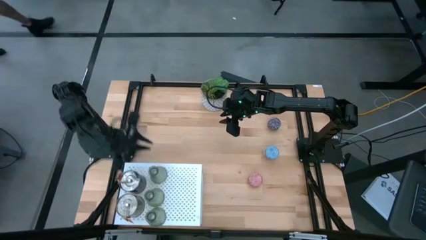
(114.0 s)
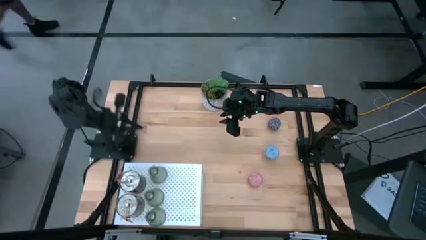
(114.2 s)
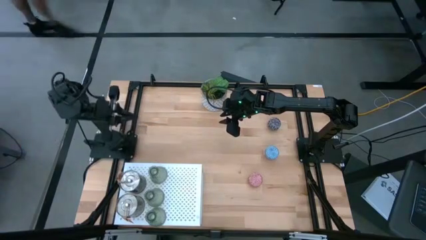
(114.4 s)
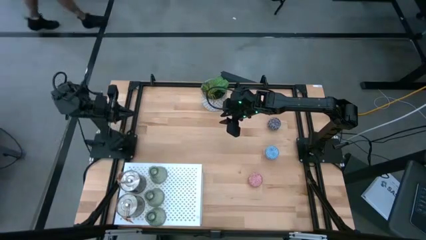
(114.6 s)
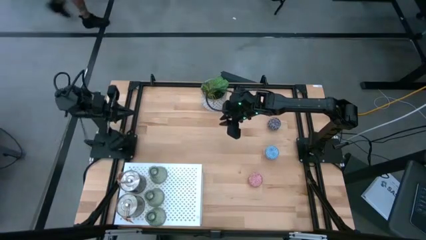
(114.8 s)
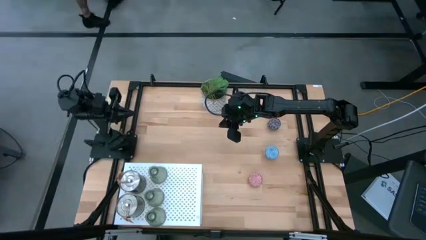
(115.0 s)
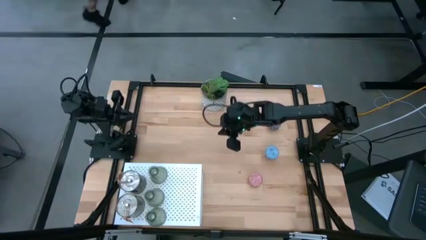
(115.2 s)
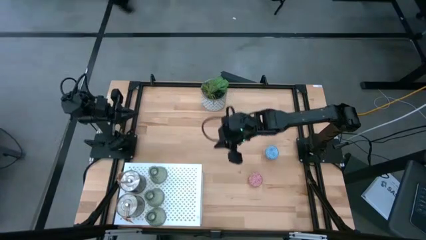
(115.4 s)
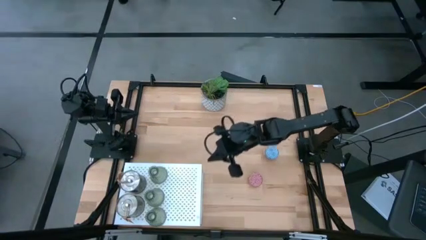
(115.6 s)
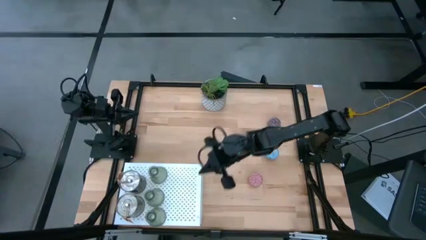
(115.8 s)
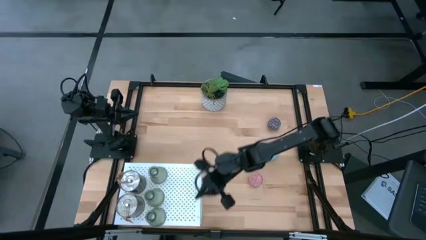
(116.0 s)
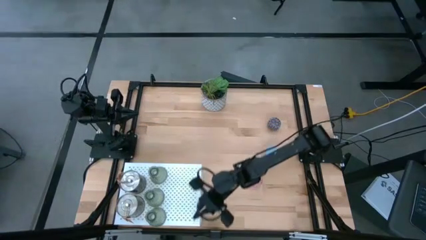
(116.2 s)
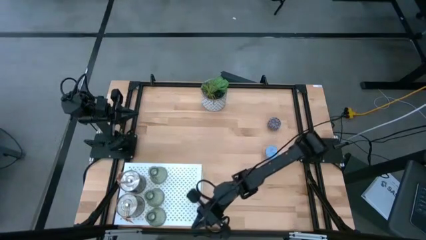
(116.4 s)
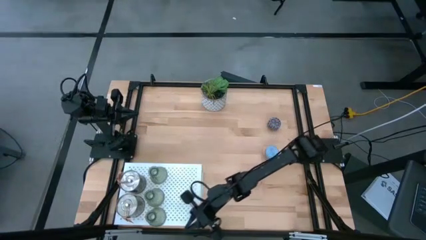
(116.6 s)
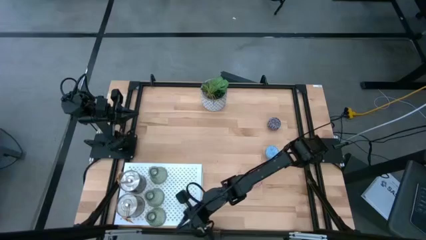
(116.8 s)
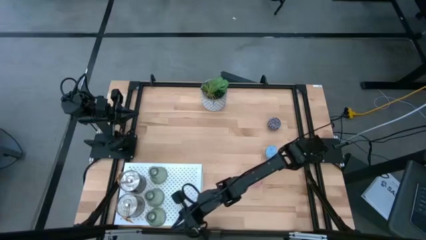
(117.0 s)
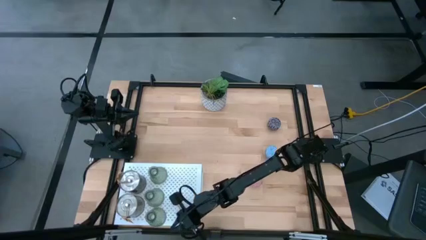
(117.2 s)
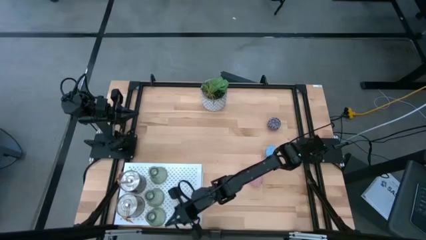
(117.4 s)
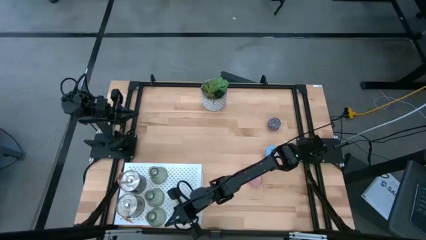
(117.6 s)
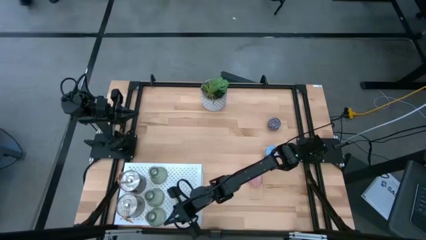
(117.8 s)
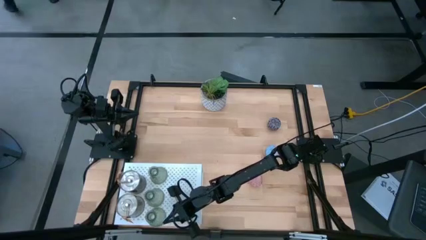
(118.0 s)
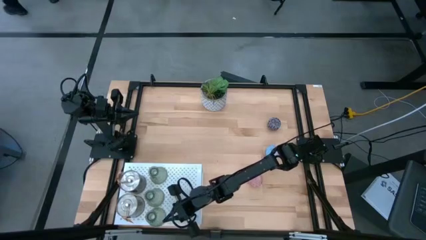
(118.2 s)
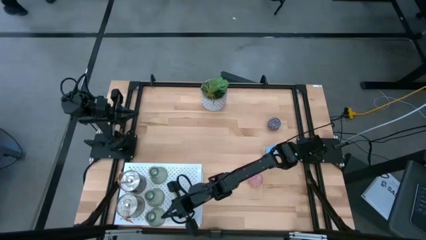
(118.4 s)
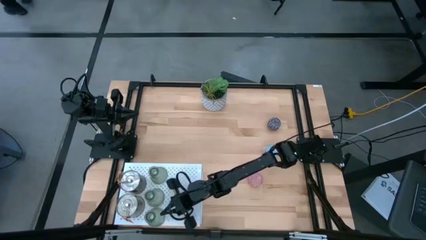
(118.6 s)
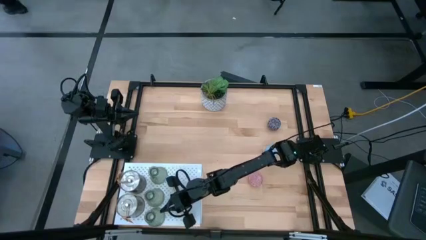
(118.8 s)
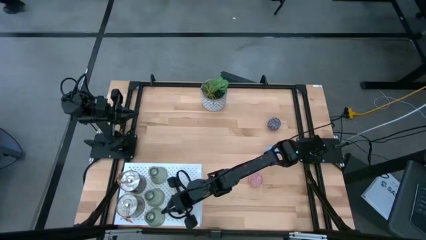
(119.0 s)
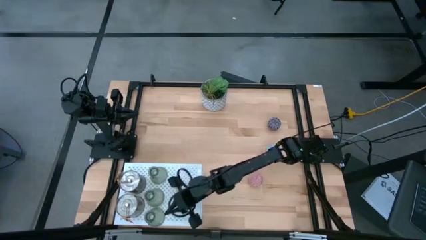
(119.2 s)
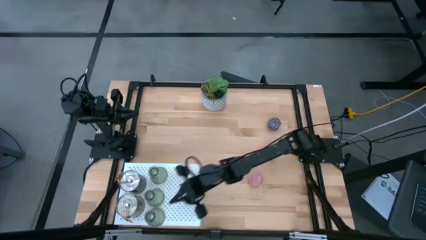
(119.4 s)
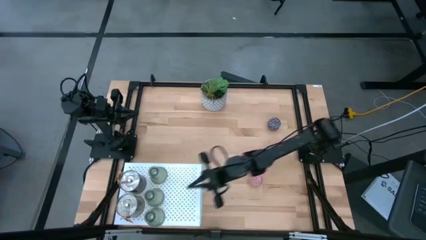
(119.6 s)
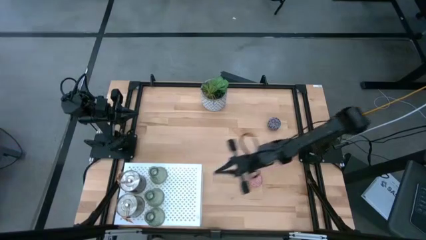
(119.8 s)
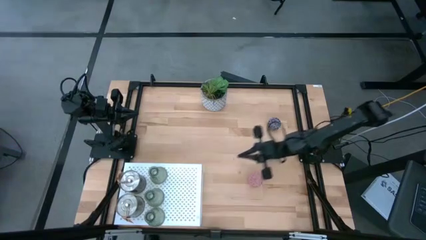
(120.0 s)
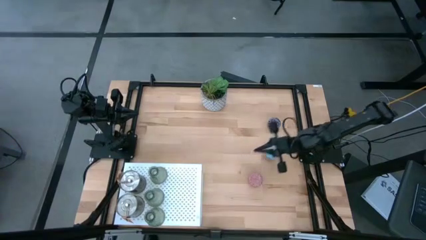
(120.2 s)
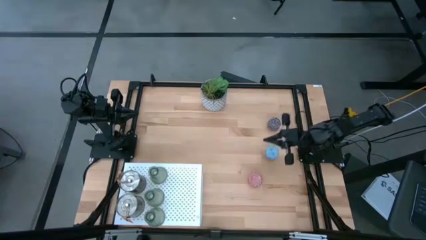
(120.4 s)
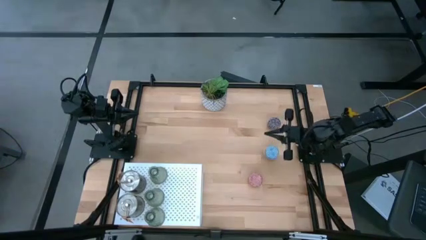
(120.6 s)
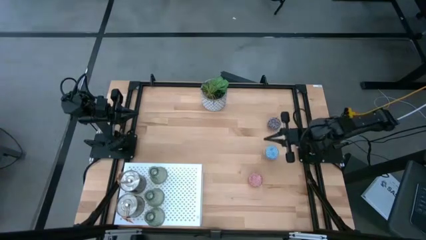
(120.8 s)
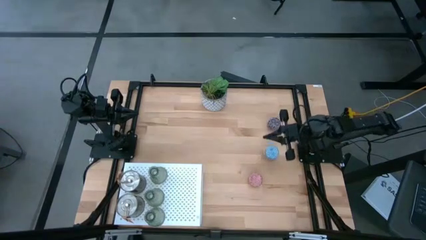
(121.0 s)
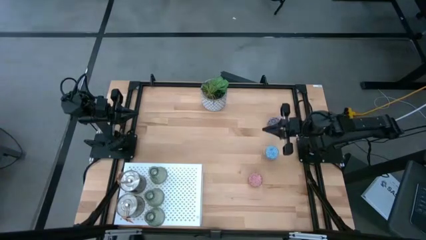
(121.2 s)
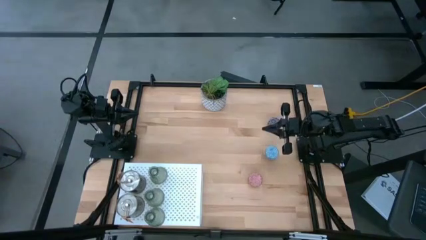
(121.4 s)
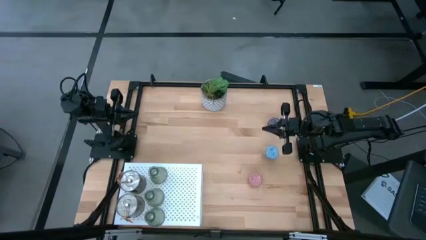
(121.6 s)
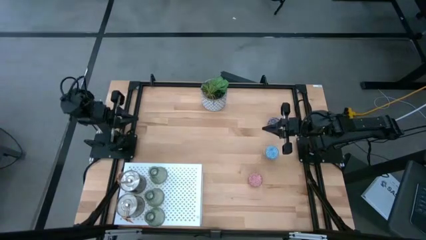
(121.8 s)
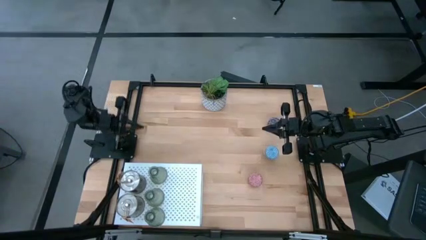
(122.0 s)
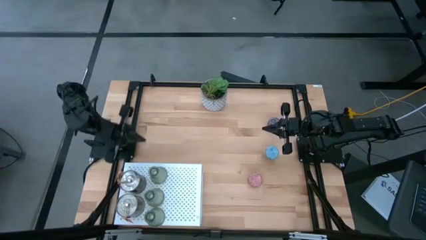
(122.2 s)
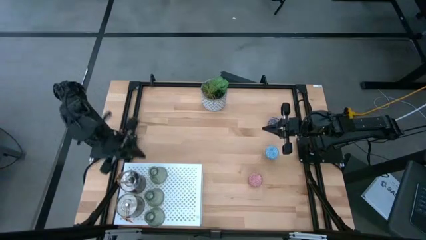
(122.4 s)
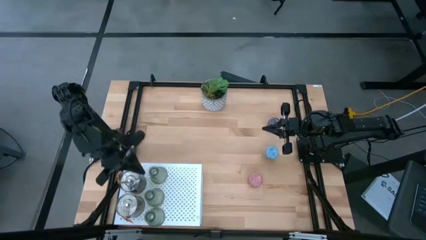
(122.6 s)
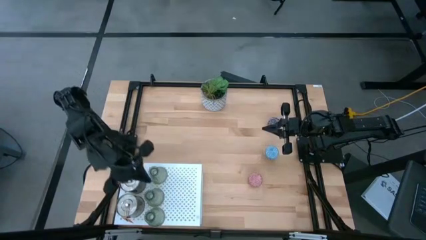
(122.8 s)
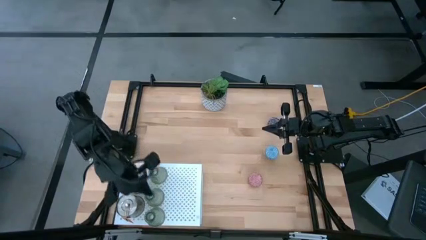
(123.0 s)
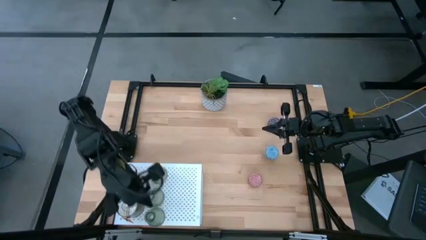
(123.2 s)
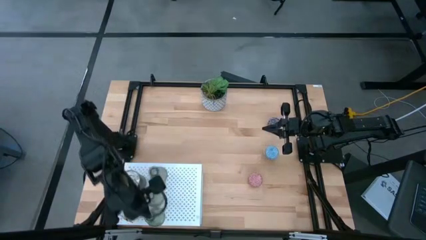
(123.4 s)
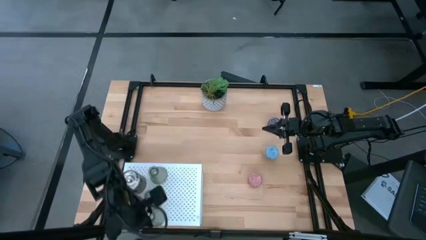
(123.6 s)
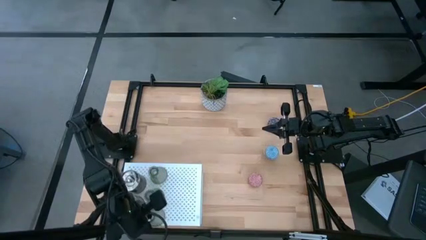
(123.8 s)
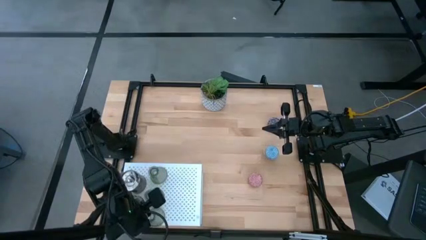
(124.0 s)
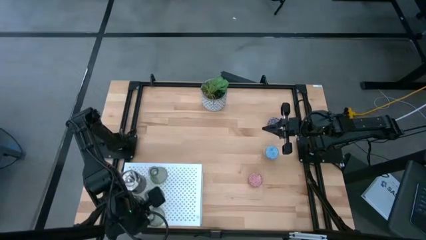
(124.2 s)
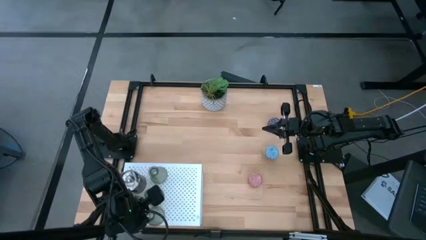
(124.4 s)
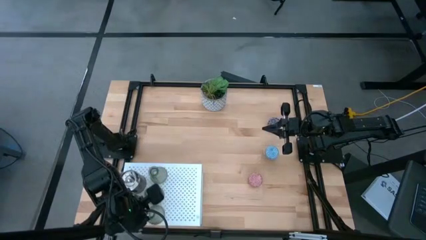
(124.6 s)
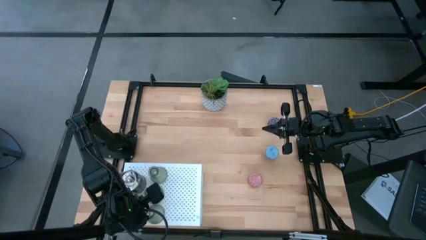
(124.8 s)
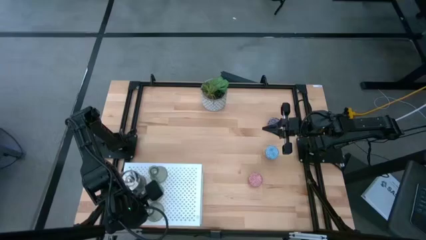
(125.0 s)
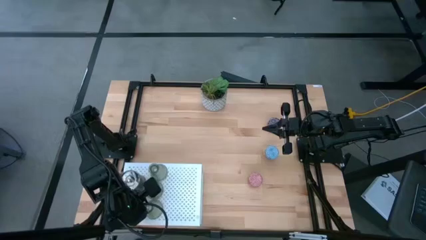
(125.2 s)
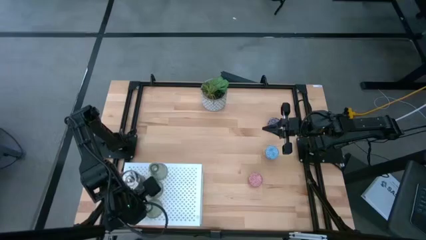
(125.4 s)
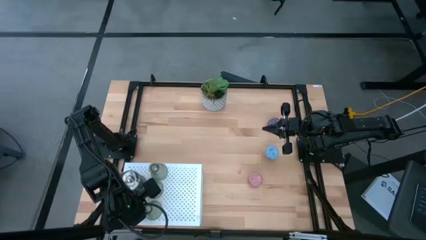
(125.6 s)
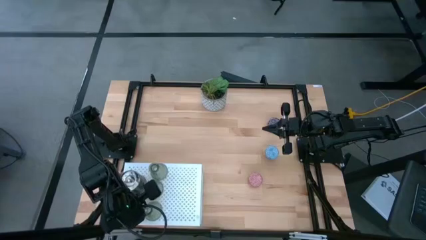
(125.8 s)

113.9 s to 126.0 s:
Task: Pick & Place candle stick holders
Adjust the transparent candle holders on the shelf

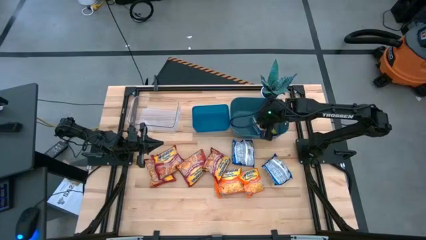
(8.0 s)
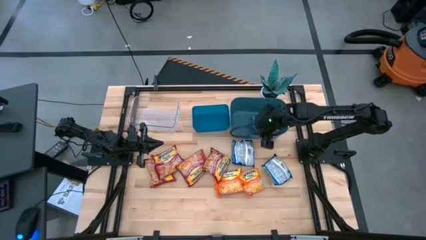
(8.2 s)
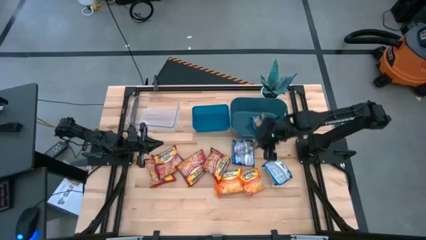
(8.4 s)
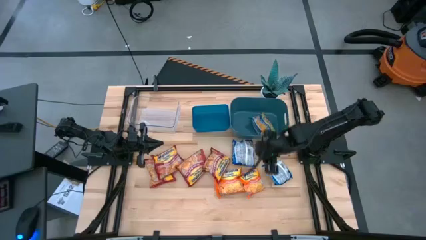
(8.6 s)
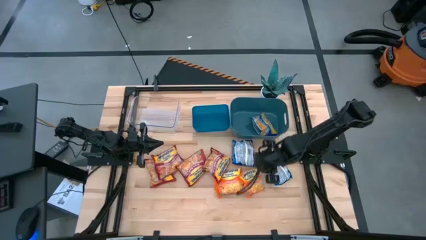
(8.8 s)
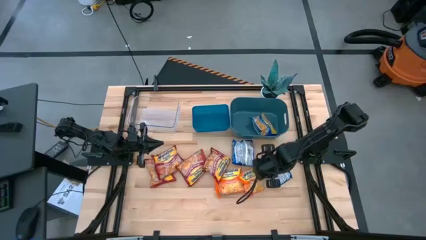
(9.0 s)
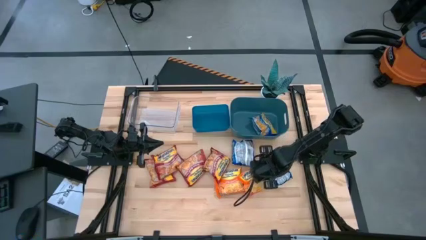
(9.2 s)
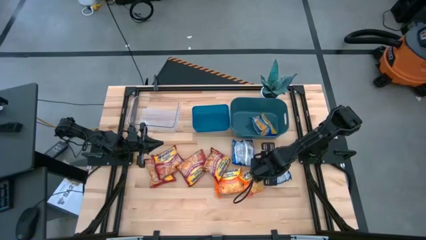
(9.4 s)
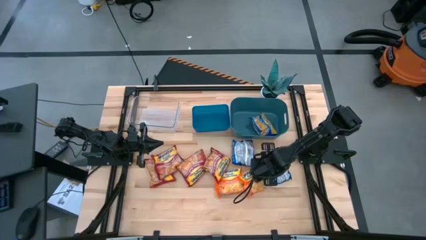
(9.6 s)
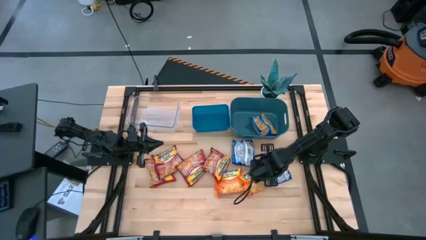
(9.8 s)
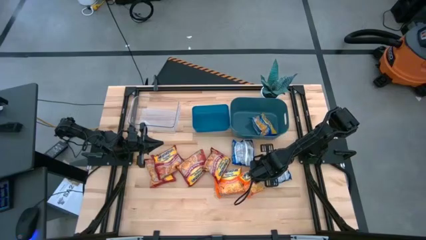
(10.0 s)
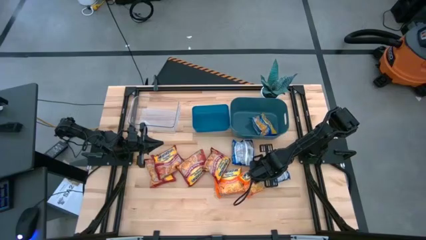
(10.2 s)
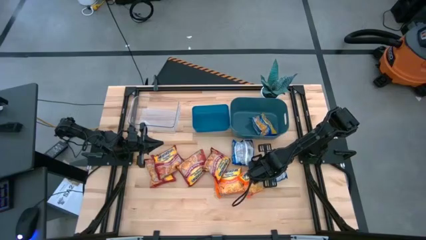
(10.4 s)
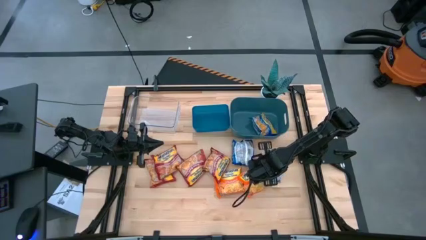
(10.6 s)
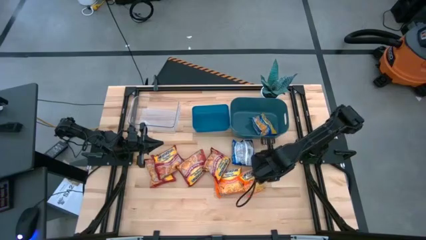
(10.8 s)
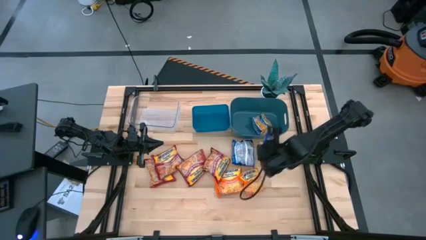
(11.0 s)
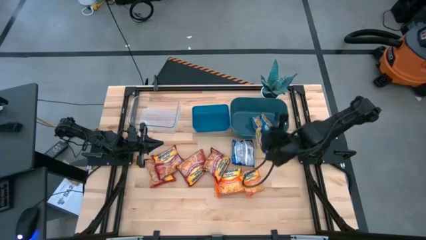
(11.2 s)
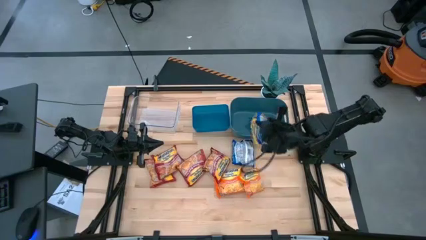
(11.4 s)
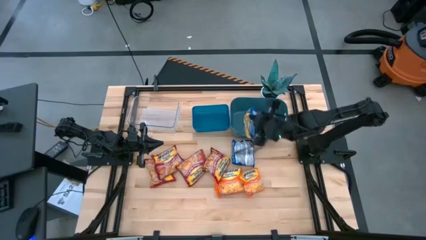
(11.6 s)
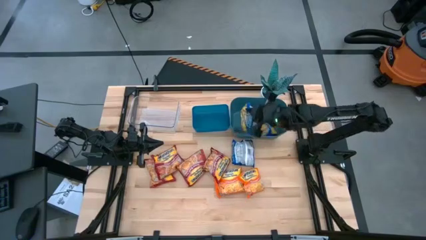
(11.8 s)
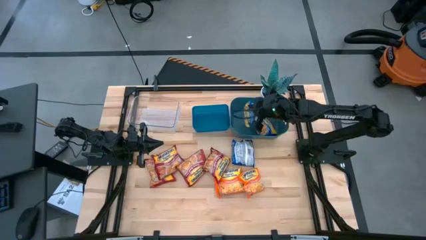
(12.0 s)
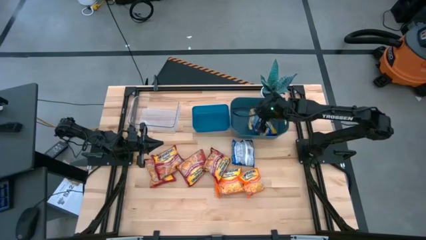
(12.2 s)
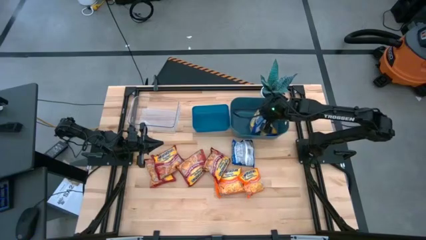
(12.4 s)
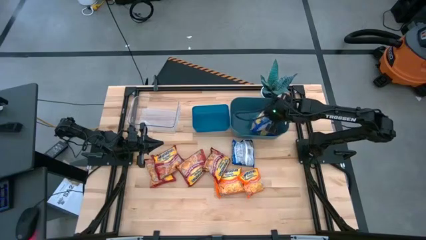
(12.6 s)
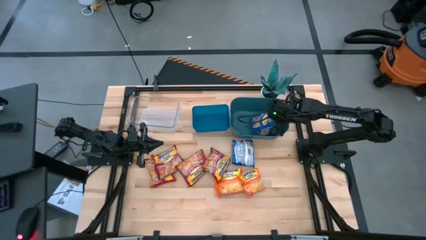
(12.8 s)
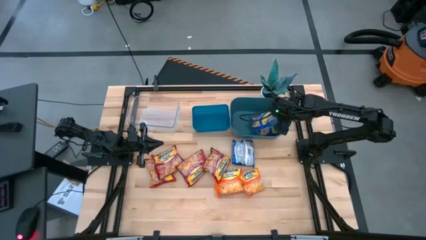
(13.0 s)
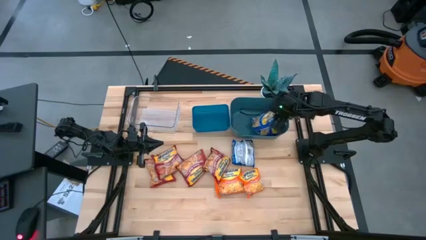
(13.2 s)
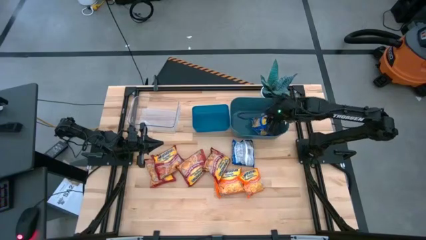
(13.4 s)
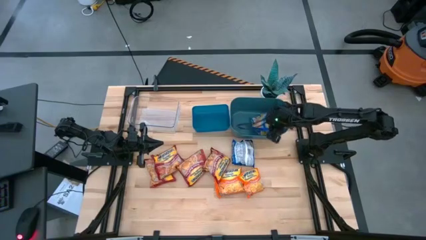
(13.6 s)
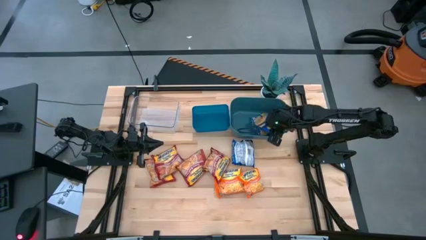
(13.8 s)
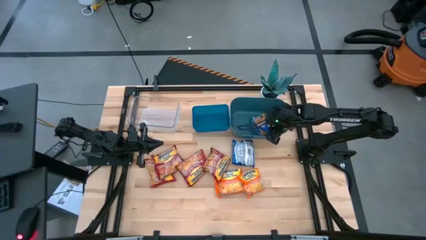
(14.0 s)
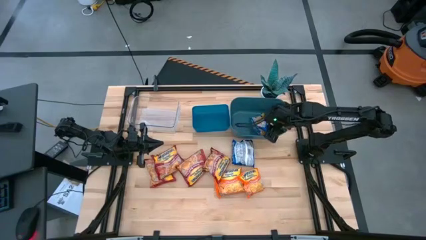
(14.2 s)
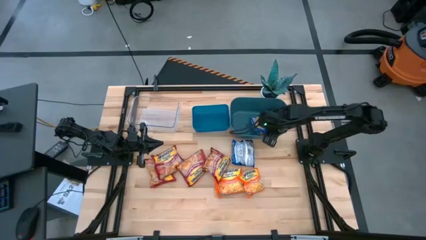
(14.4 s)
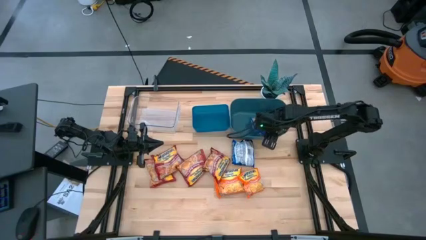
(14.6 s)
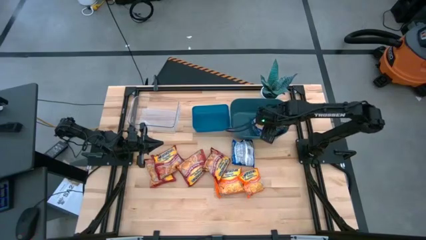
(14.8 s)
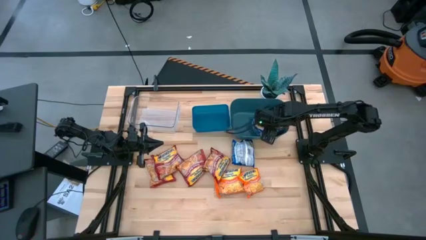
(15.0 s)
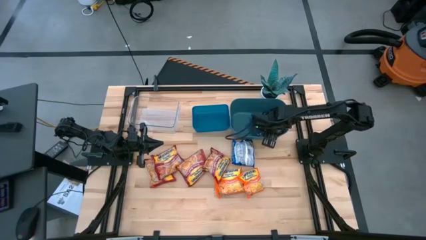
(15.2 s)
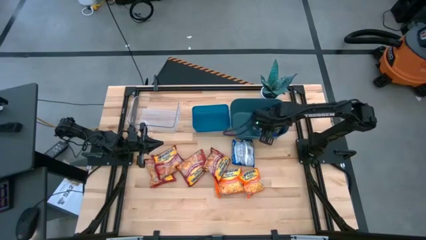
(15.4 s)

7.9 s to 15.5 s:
Task: Sort Maruchan noodles
Put the blue noodle pack into the green bin
